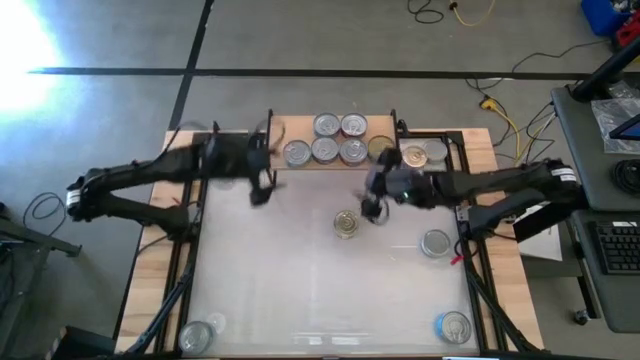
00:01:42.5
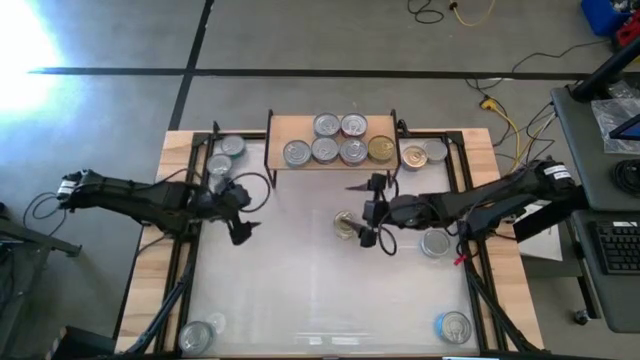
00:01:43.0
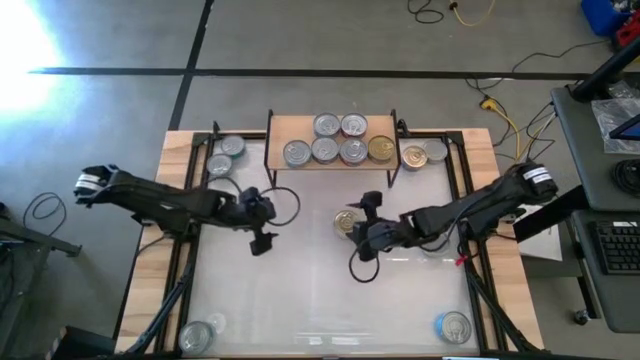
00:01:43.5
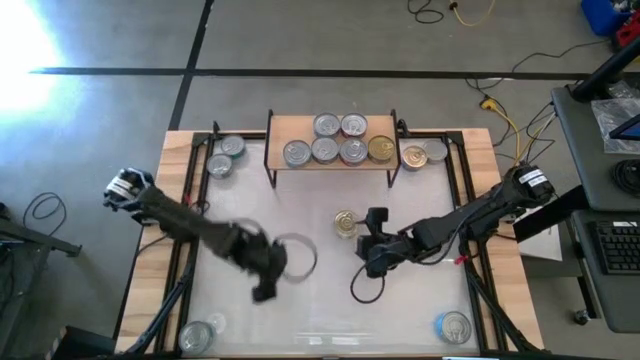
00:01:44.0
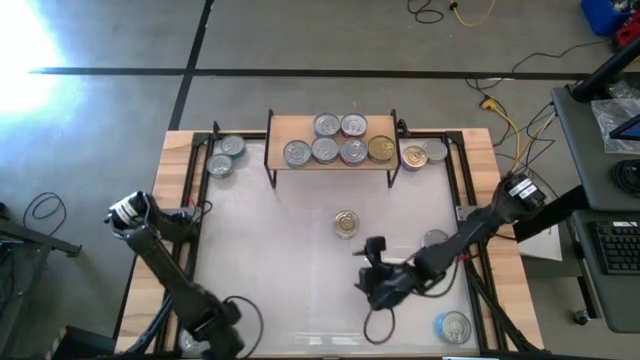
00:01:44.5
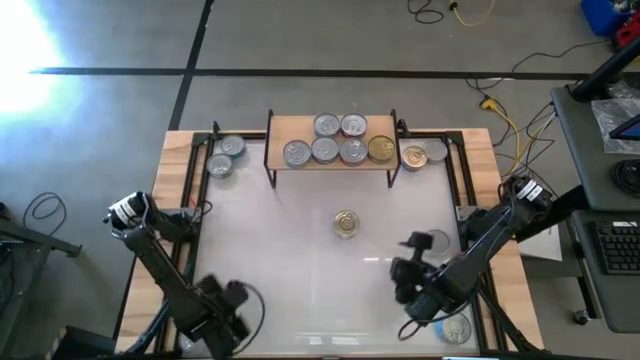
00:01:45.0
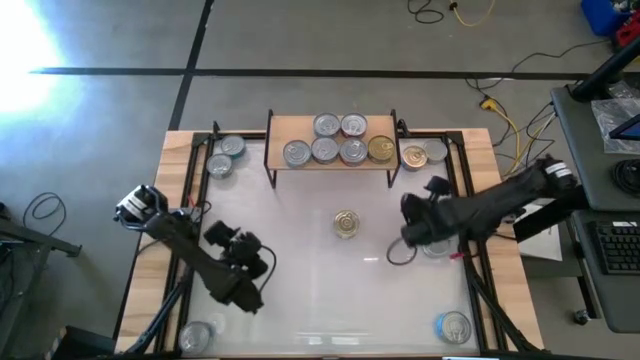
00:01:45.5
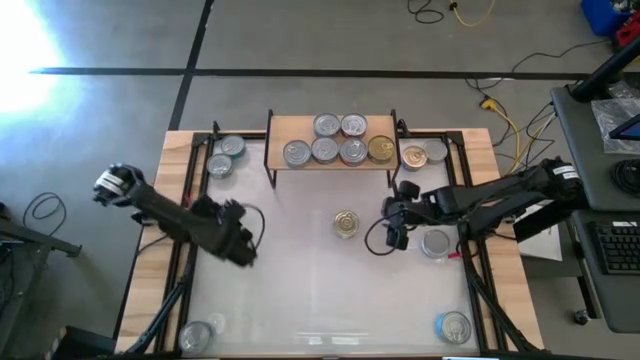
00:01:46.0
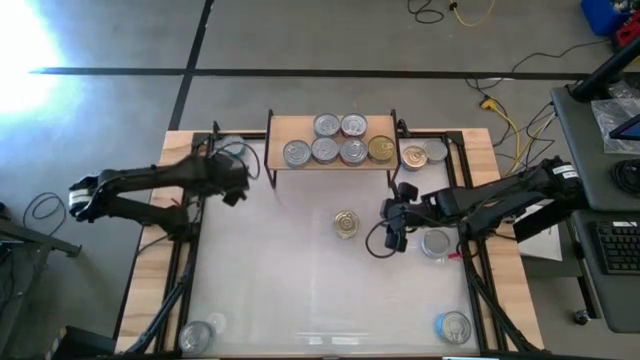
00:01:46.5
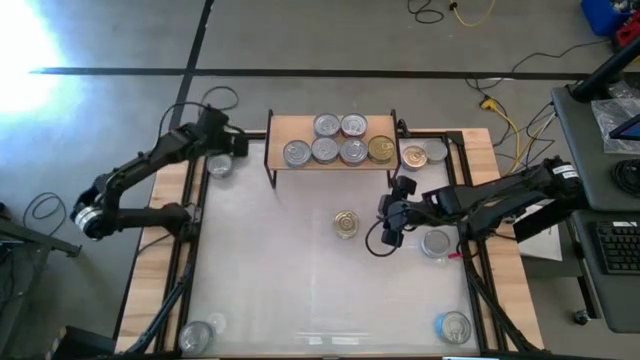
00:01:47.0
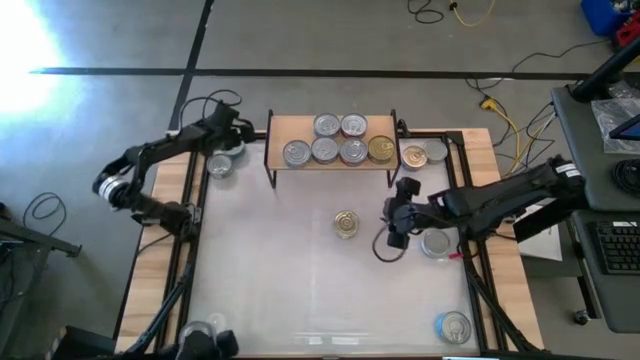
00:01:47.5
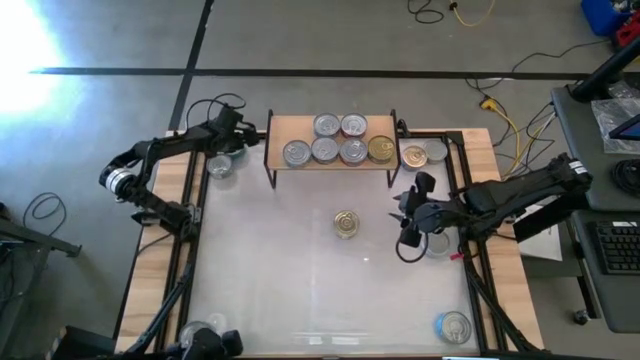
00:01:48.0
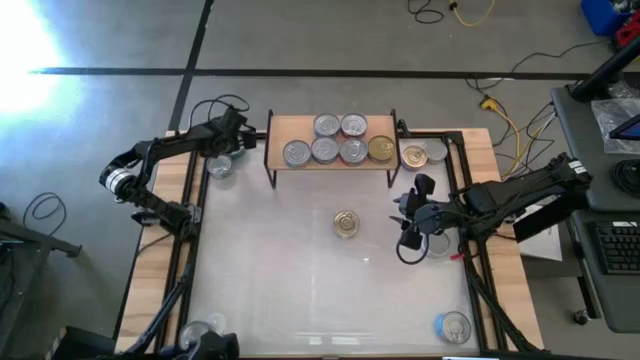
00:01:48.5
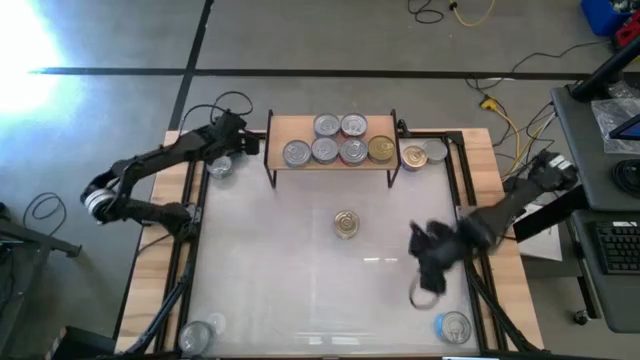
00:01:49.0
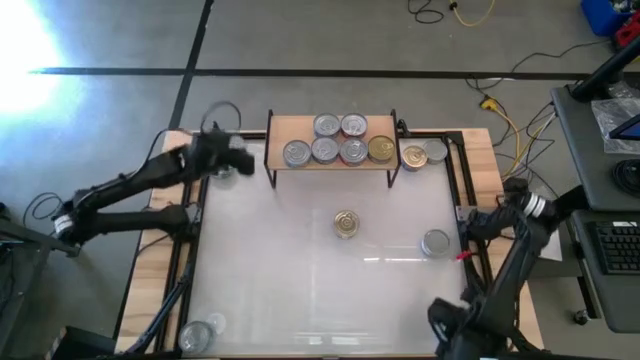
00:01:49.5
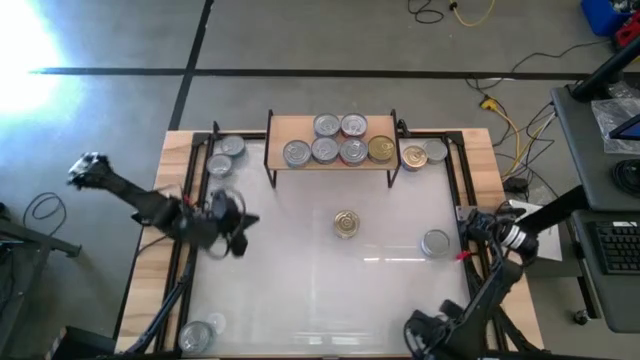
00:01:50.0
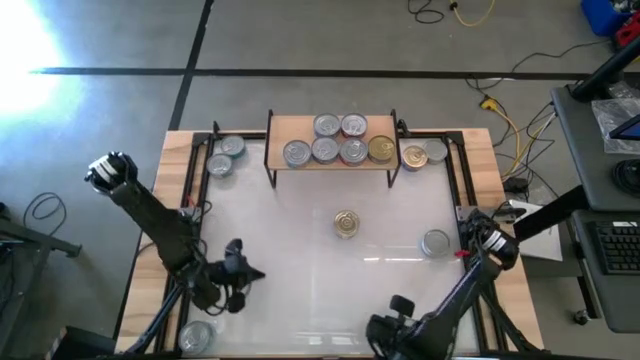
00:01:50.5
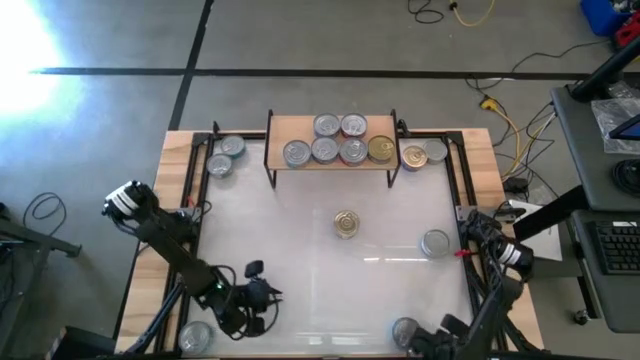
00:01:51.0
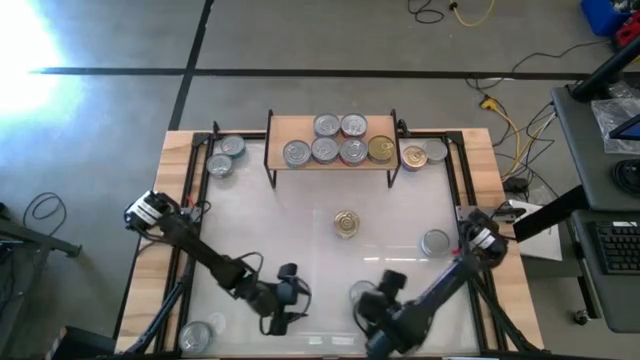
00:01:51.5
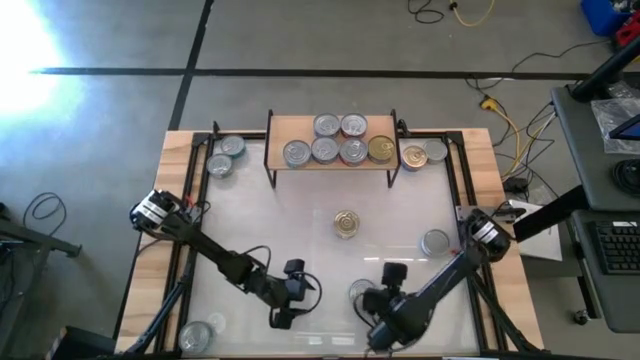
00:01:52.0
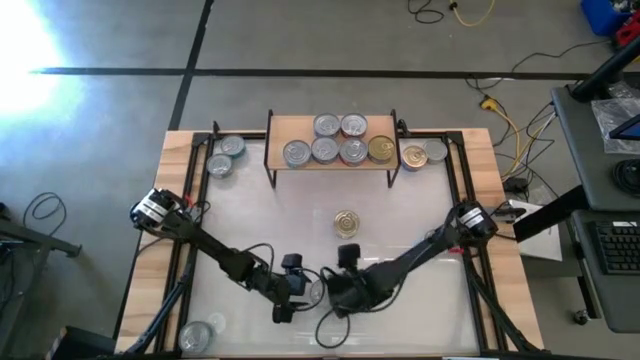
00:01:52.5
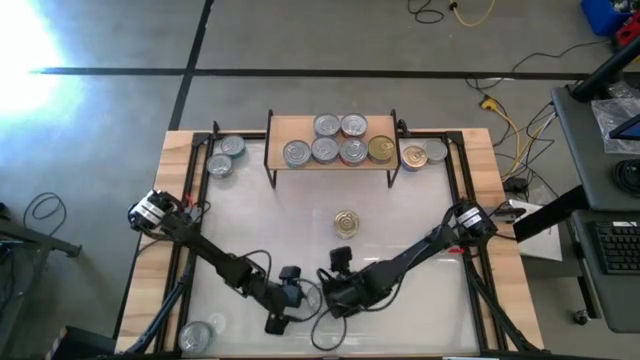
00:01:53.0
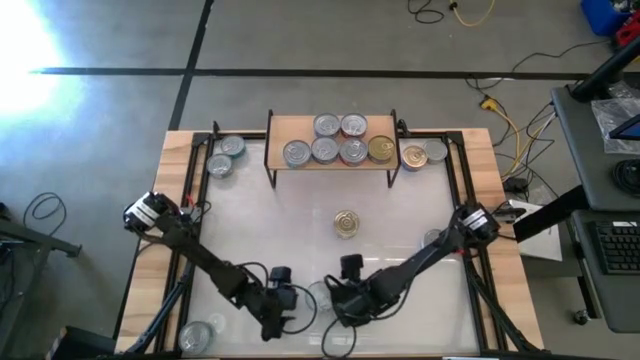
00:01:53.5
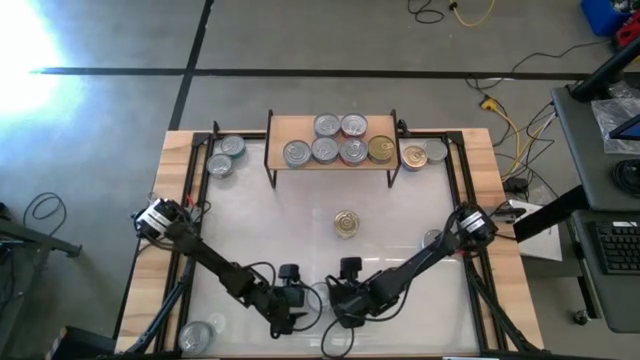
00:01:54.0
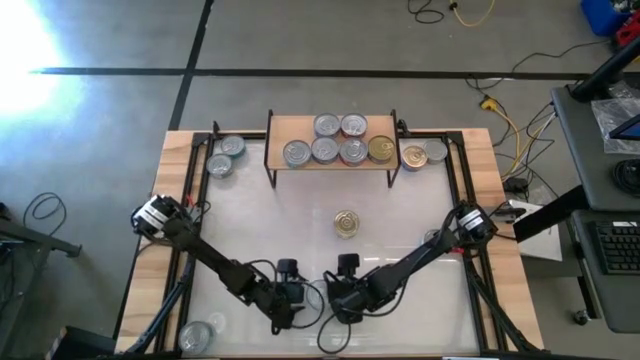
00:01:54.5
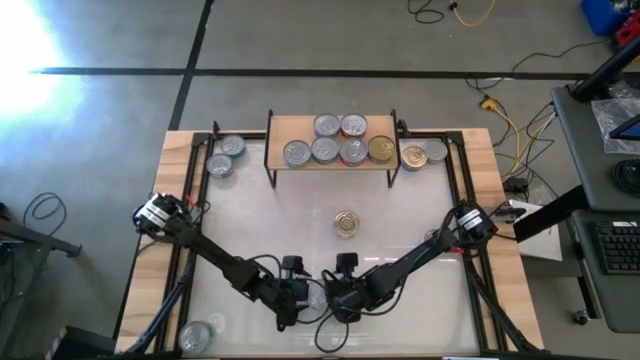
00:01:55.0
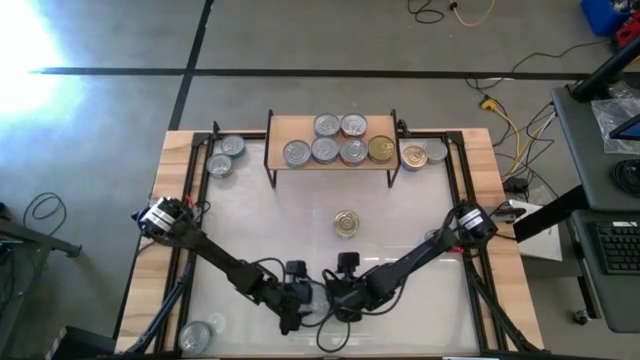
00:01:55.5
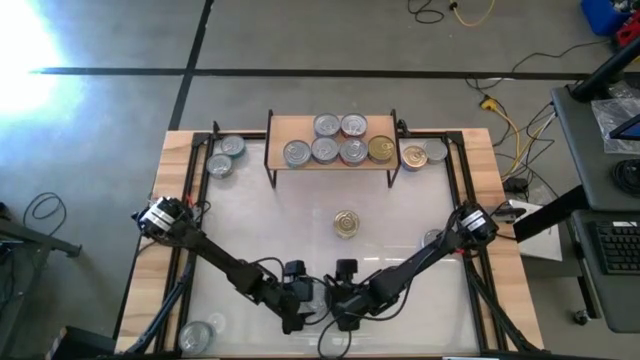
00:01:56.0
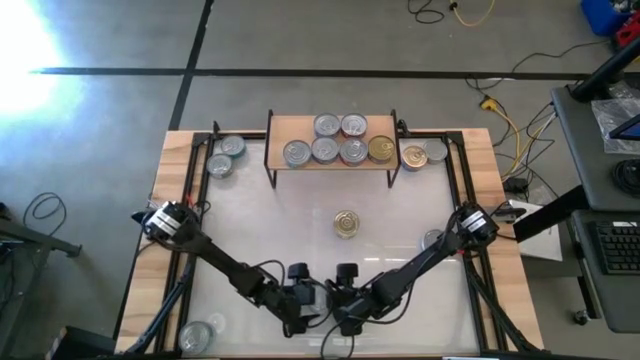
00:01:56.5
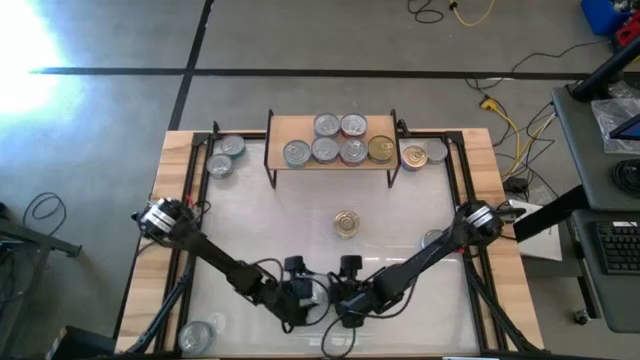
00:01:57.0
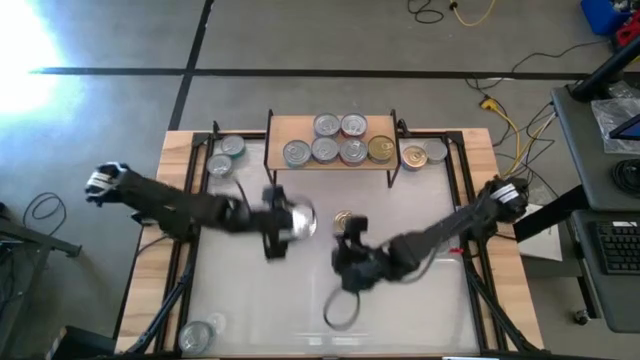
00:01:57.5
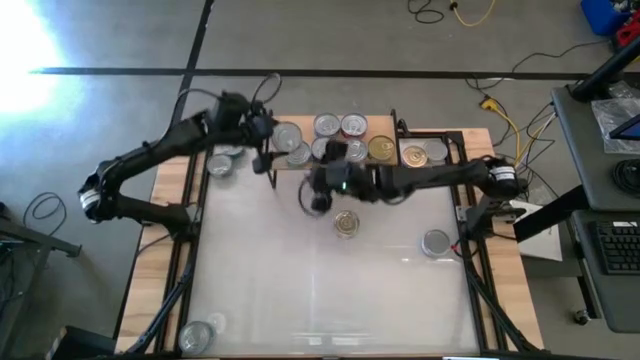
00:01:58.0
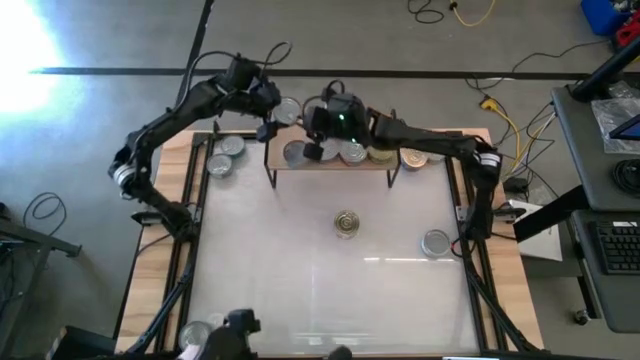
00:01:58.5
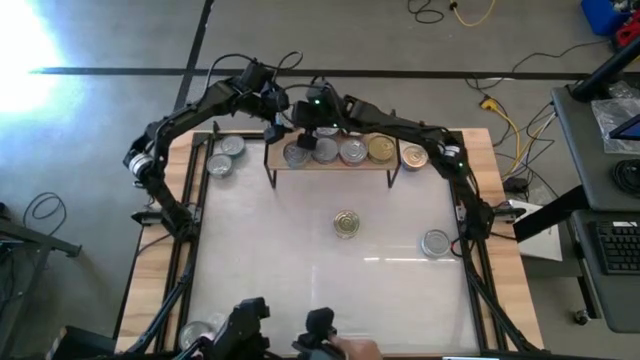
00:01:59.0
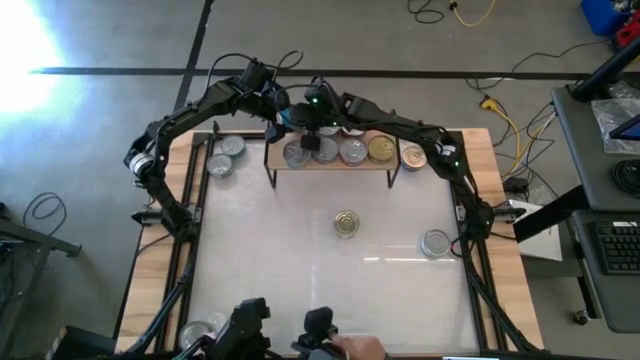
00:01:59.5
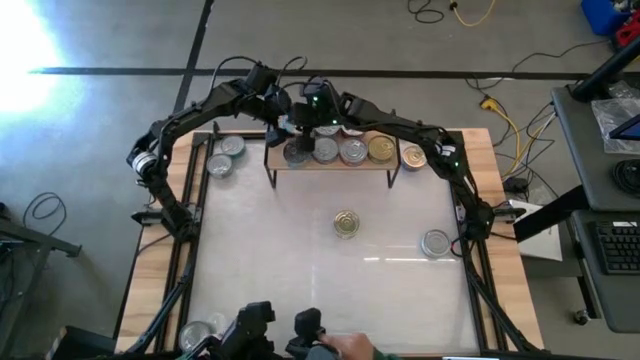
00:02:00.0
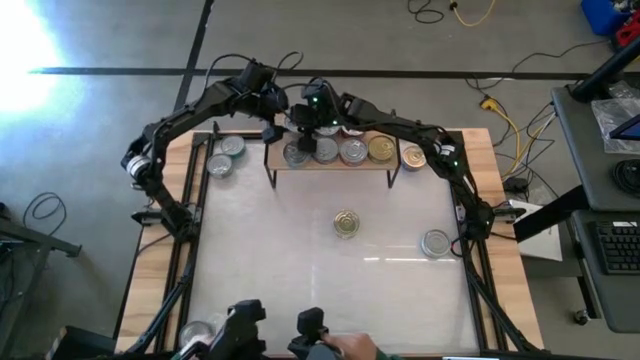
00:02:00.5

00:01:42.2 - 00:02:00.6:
Task: Stack canned seafood by type on shelf
Put the bottom right yellow-blue tuna can on the shelf

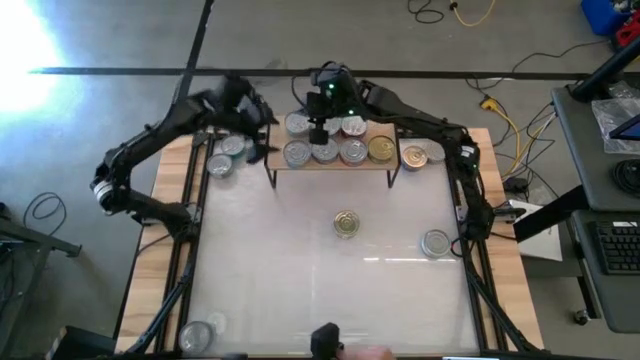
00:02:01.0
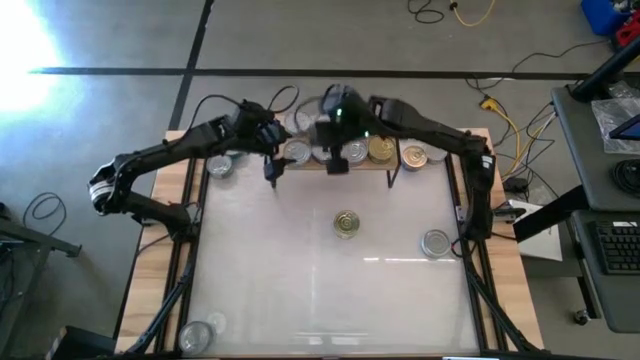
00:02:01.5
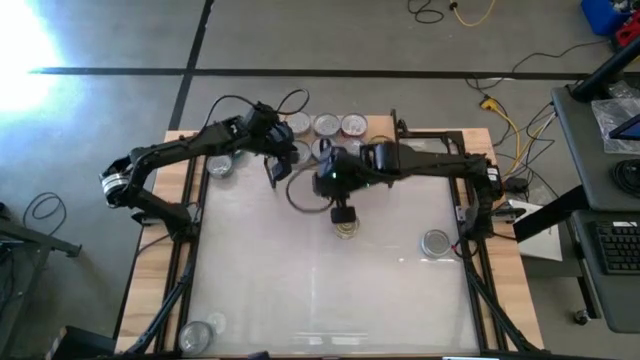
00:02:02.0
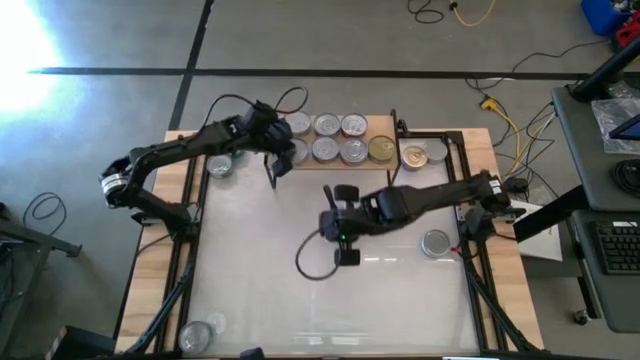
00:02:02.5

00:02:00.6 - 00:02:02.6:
Adjust the green-blue tuna can on the shelf

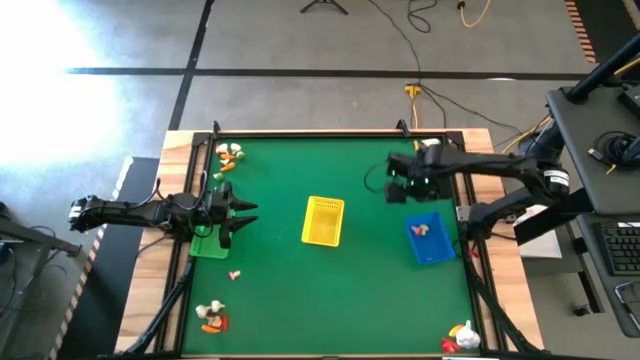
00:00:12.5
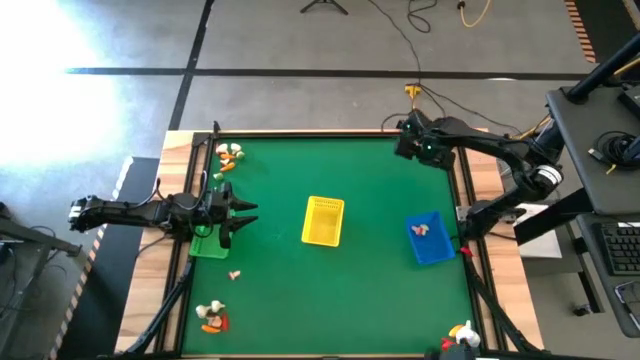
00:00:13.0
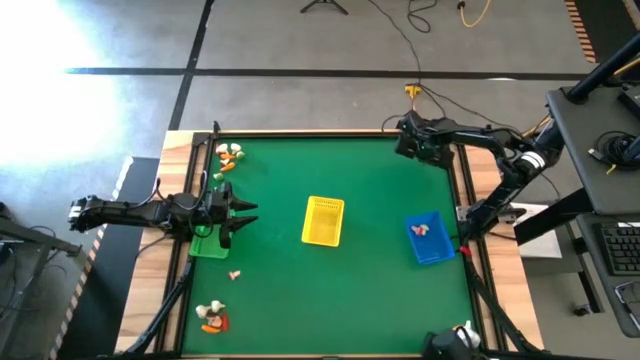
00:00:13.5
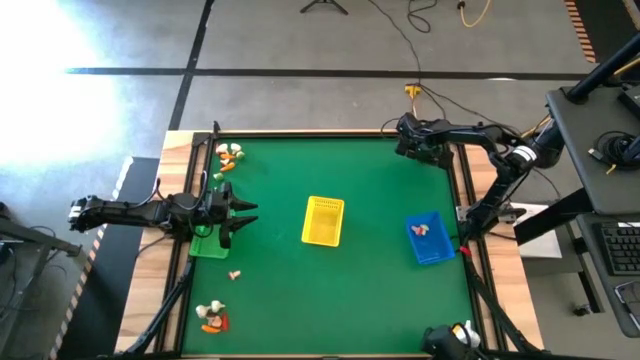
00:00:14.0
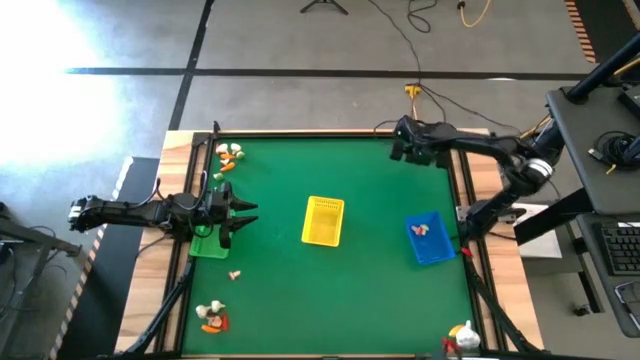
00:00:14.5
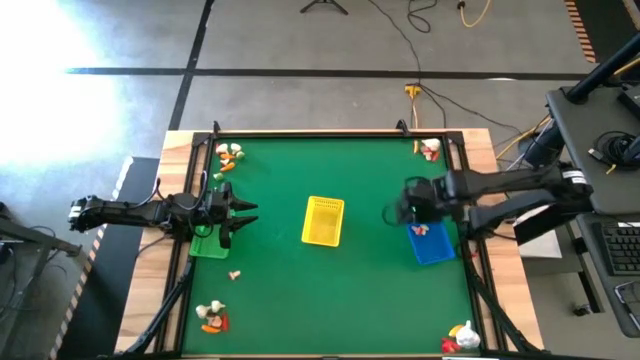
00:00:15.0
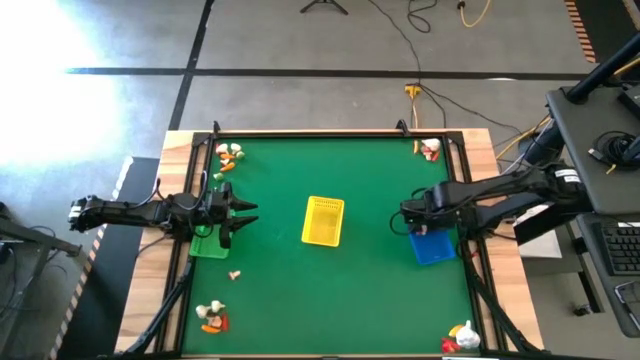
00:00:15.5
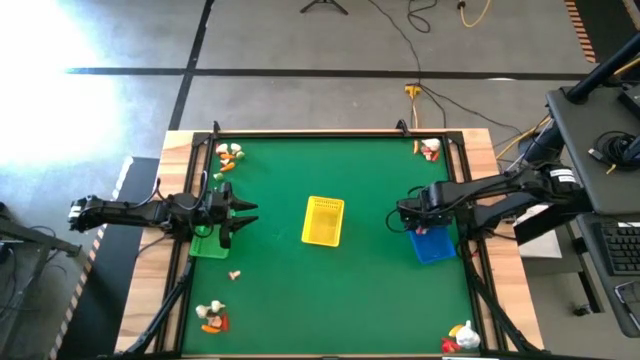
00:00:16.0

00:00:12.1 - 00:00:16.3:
Task: Sort produce into baskets
Put the red mushroom into the blue bin
